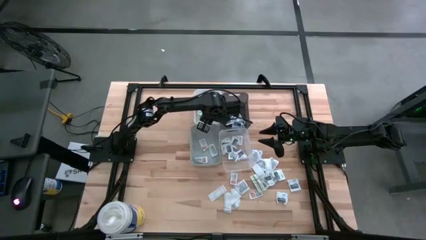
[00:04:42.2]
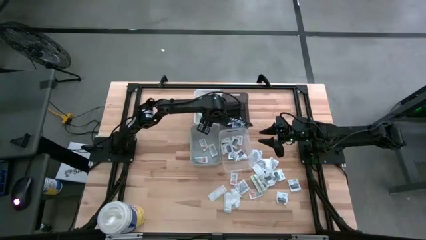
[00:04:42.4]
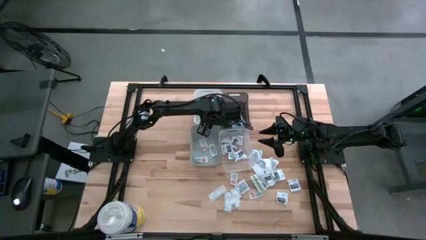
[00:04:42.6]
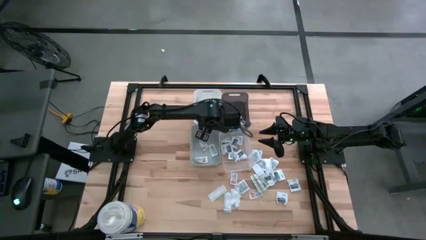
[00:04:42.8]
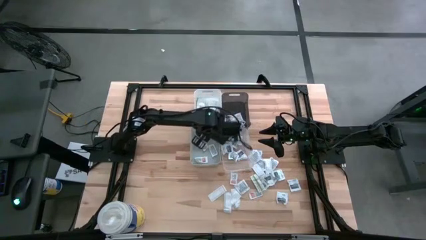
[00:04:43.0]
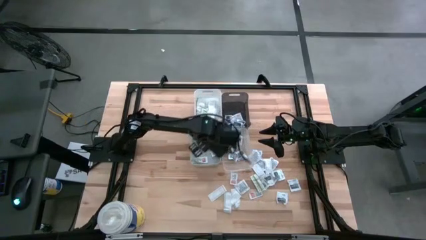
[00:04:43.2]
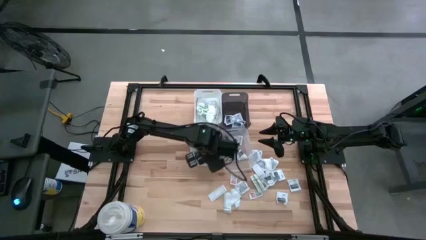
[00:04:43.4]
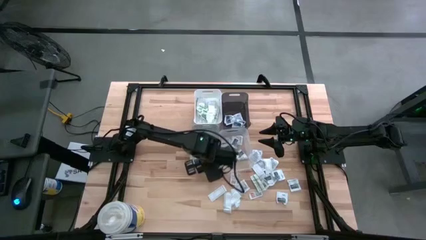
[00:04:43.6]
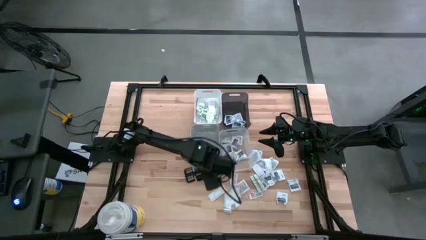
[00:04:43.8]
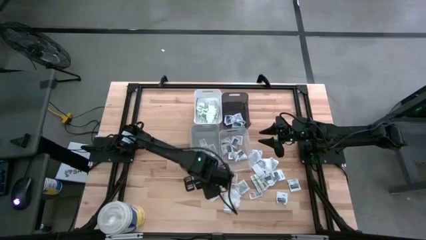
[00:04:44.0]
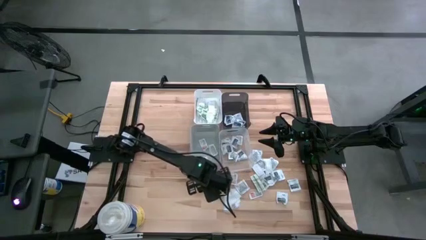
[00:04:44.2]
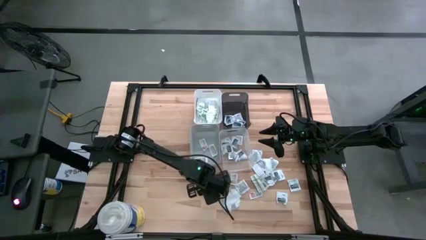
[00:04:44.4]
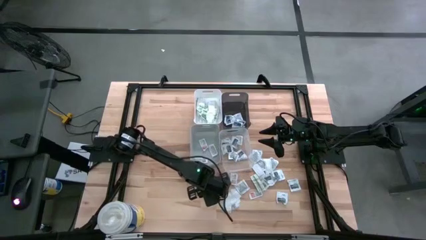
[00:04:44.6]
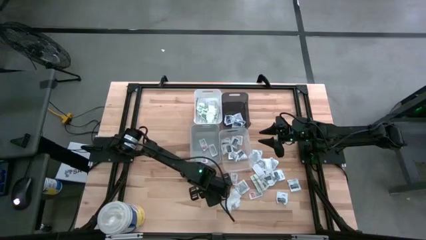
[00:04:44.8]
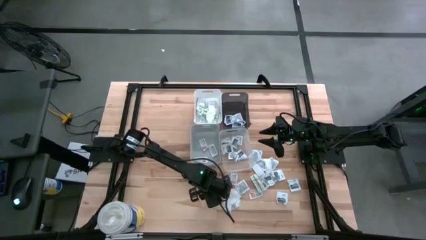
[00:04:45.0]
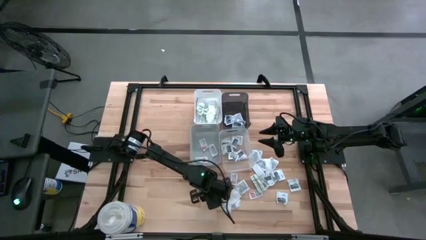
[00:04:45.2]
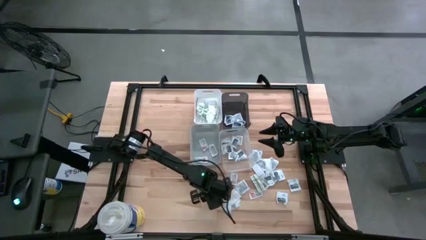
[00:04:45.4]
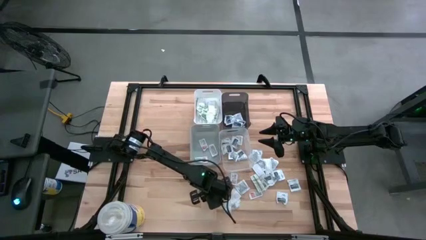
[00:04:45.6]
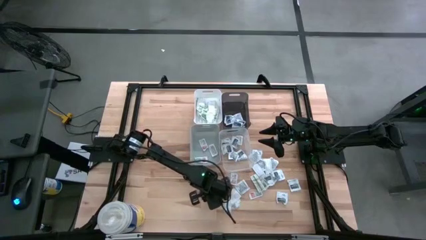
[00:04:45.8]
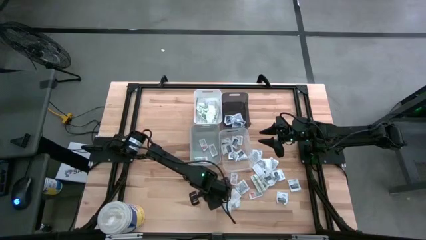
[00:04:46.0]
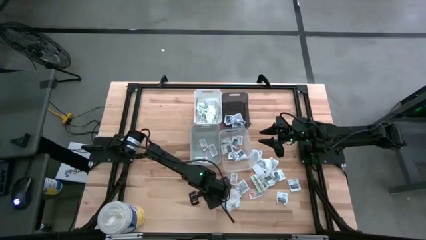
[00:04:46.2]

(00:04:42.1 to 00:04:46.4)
Task: Pick & Place First Aid Supplies
Put the green bandage pack into the white bin

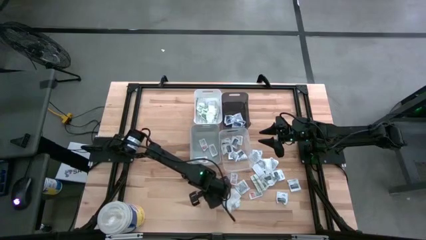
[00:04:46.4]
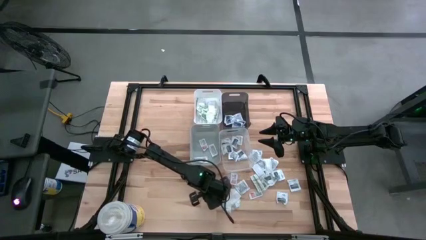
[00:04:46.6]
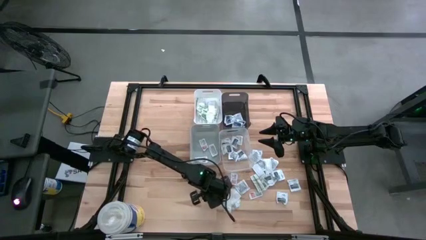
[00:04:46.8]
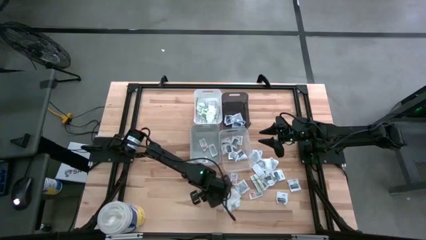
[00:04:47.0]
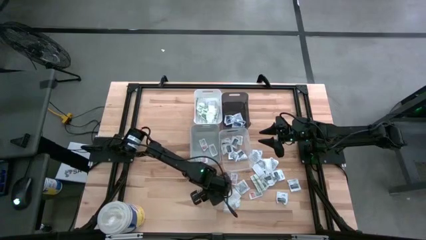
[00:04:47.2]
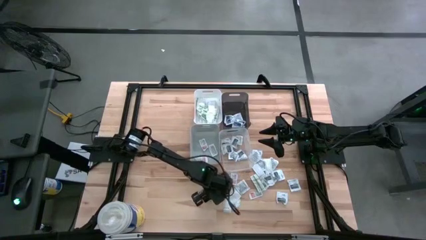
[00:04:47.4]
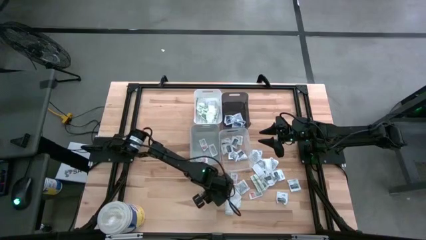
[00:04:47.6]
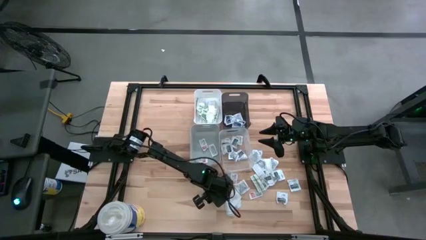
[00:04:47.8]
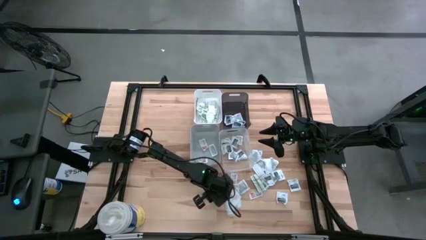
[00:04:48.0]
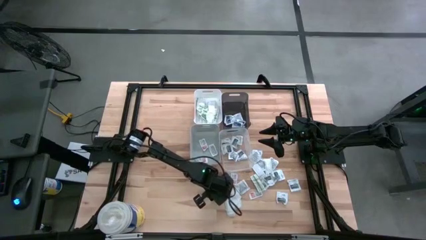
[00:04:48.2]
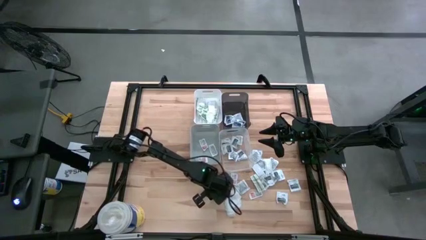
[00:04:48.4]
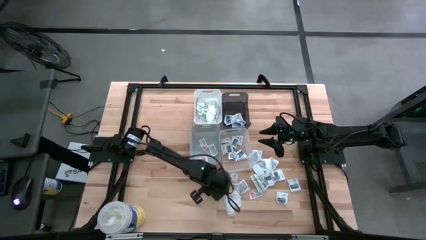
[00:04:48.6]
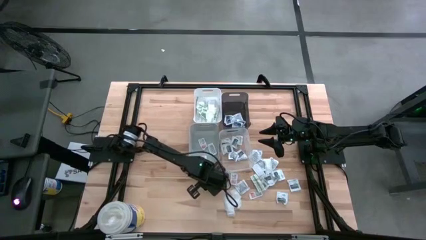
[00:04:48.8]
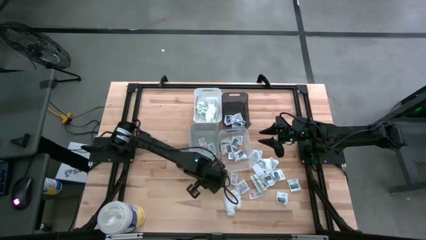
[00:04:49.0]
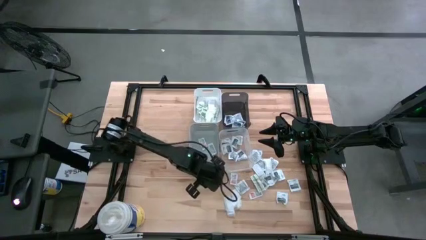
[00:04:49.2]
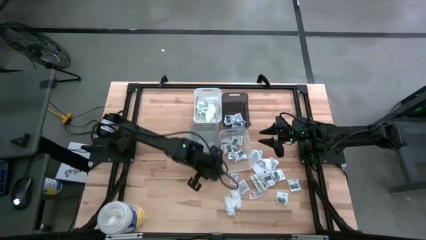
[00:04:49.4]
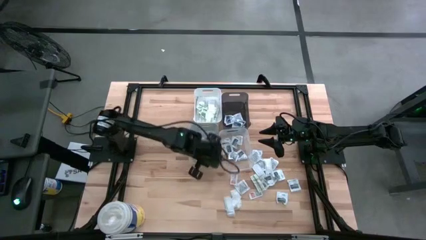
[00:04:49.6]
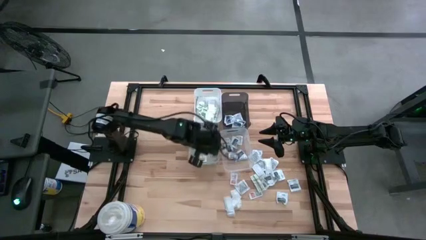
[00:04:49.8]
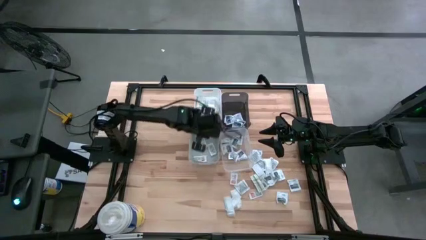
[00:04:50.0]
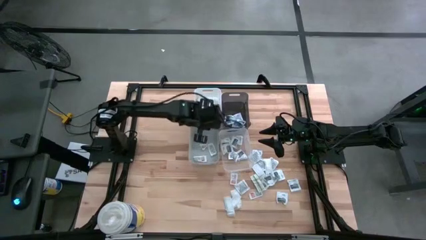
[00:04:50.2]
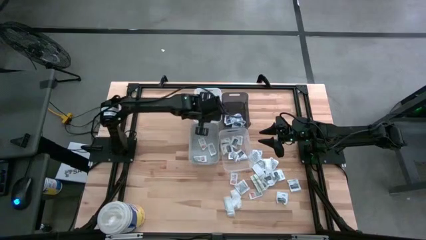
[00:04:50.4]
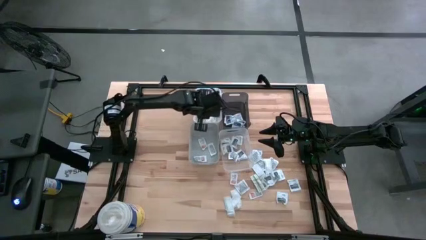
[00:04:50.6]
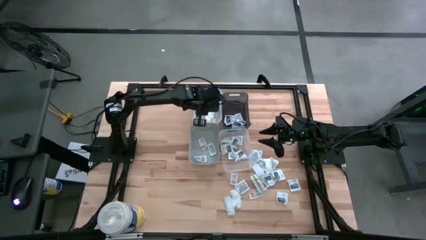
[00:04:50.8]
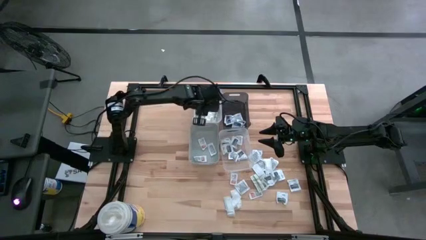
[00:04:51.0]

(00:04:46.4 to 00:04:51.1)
Put the green bandage pack into the white bin

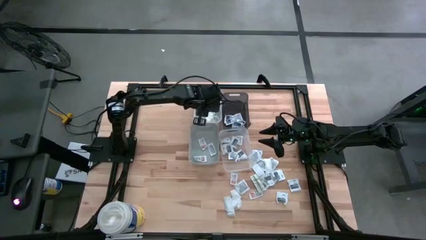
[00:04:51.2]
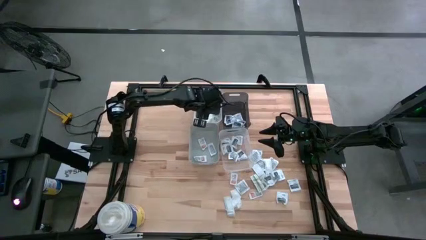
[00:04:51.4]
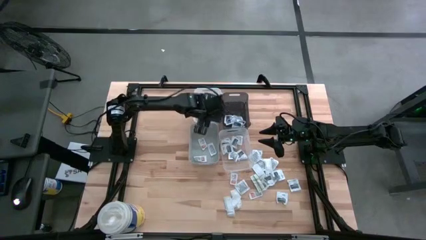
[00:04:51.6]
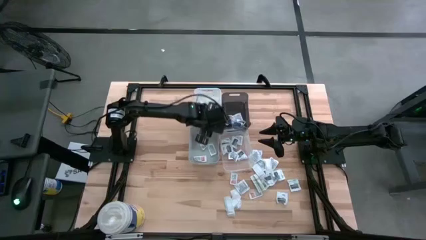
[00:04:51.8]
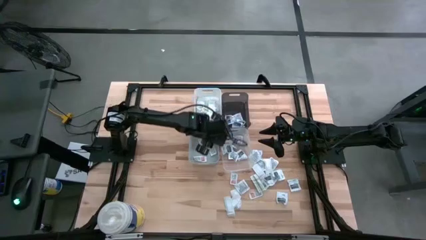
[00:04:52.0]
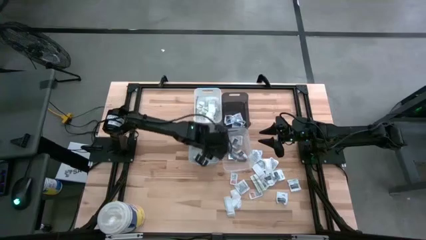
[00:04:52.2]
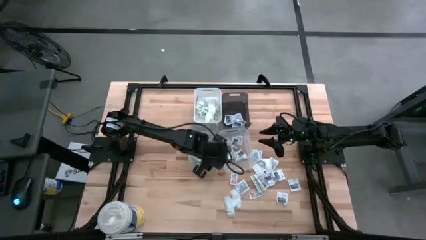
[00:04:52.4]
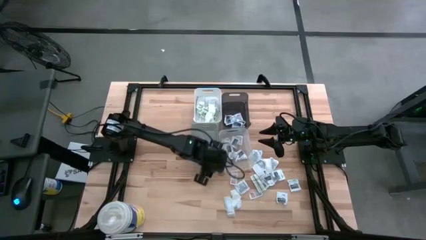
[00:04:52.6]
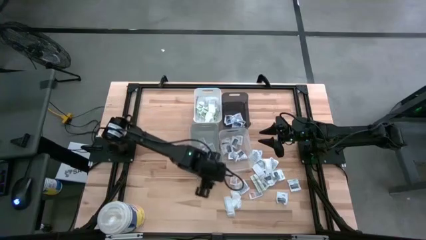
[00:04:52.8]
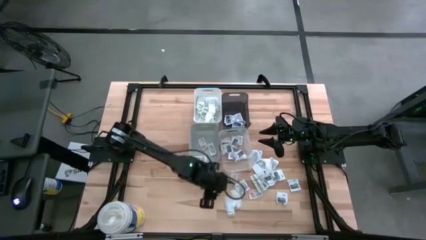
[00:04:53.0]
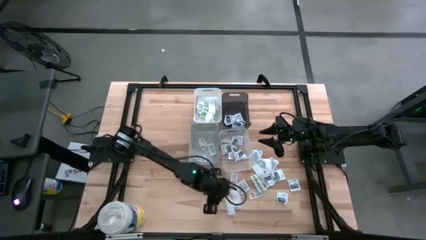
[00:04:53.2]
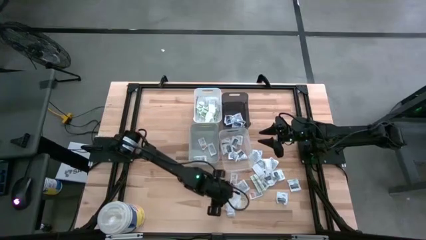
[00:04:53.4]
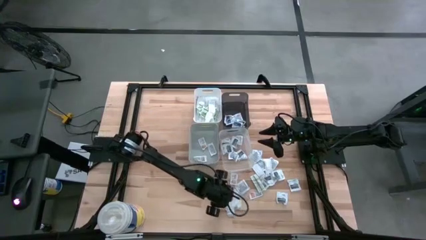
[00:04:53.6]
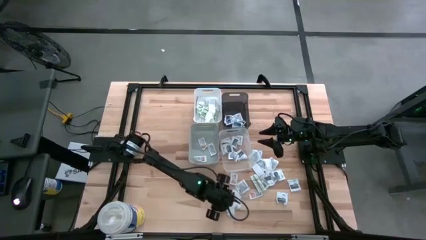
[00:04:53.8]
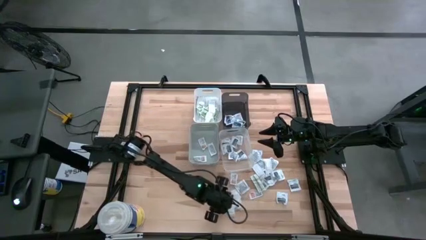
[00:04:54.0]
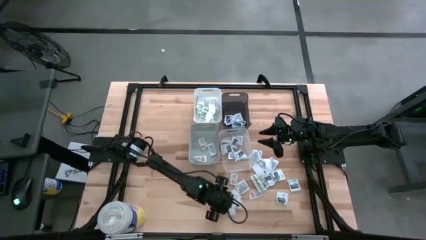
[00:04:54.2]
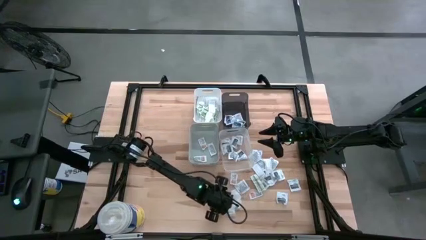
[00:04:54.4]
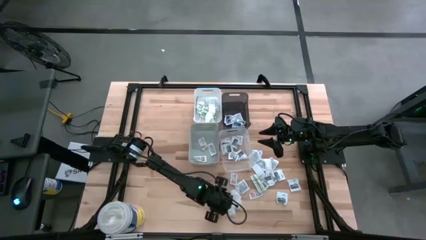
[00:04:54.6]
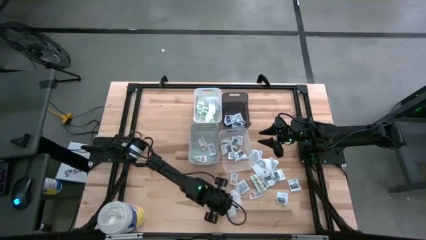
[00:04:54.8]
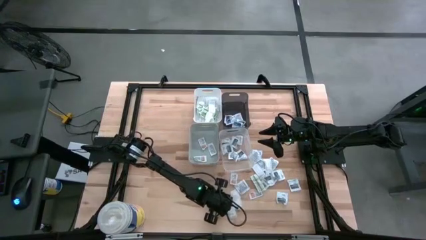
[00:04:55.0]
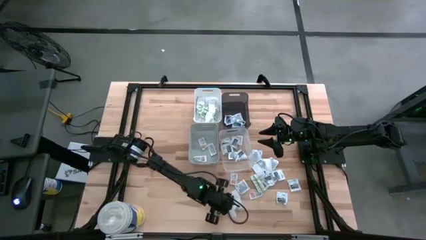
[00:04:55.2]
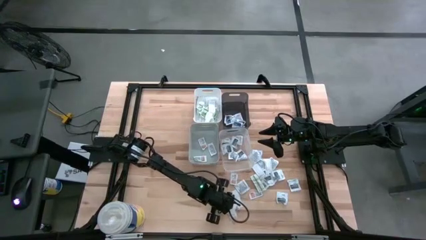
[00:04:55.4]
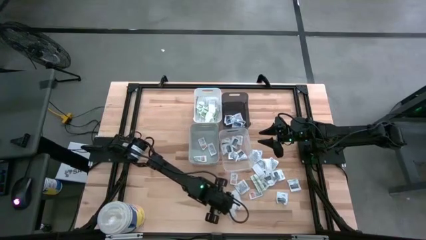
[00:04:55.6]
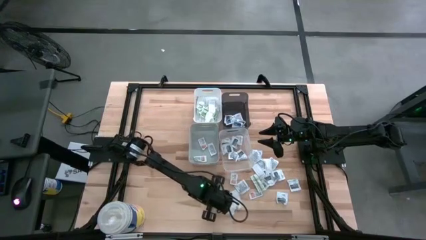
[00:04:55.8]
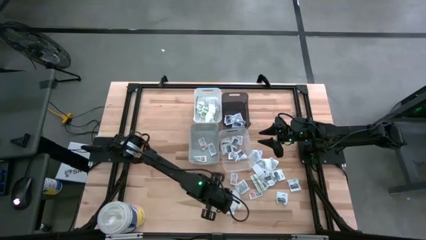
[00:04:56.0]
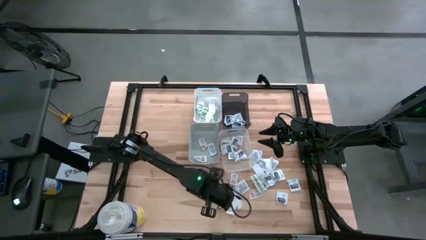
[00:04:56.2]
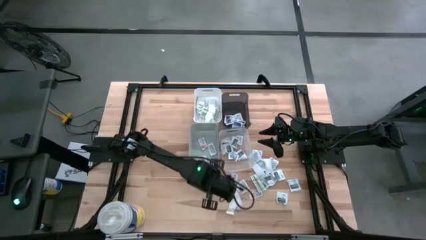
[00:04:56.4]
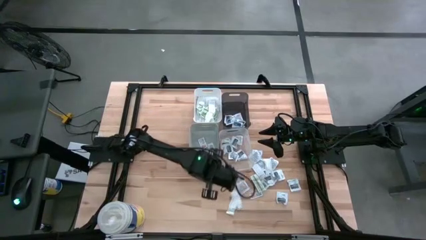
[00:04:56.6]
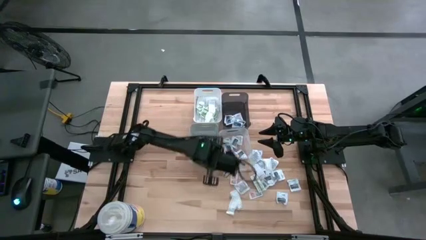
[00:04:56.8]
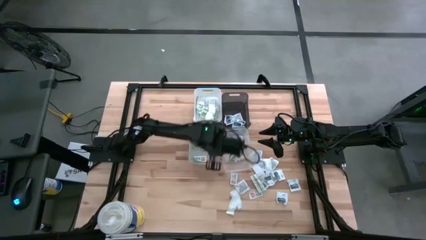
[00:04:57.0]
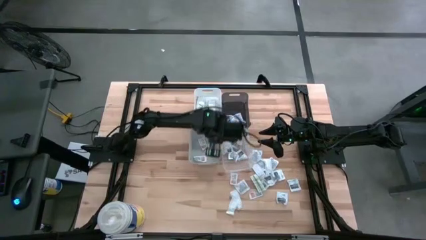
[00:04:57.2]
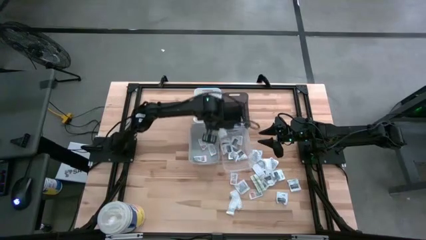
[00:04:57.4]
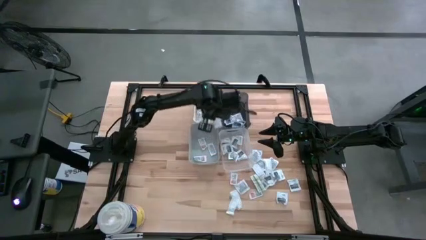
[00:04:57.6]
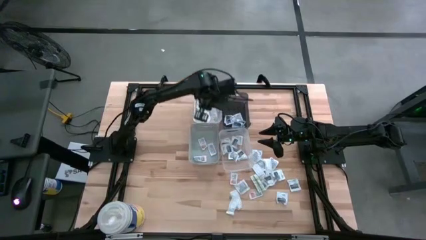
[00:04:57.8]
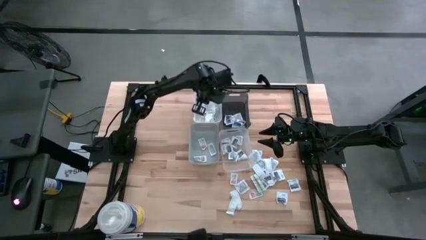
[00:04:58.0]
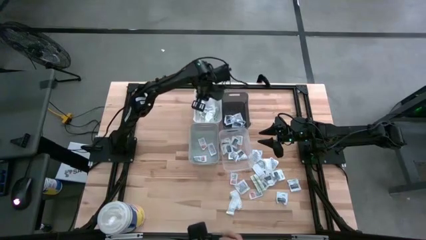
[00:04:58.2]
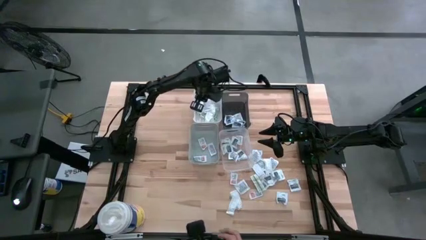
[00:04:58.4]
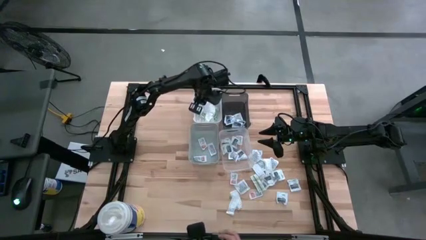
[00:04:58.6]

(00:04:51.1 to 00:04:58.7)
Put the green bandage pack into the white bin
